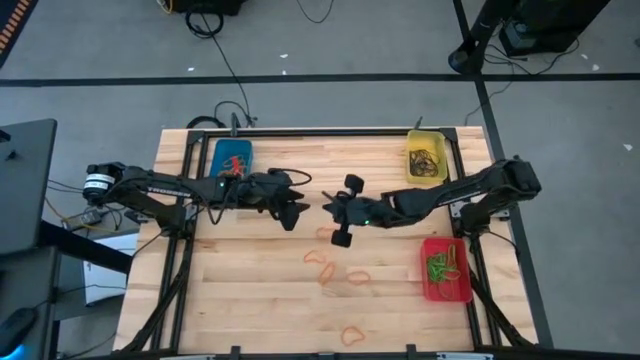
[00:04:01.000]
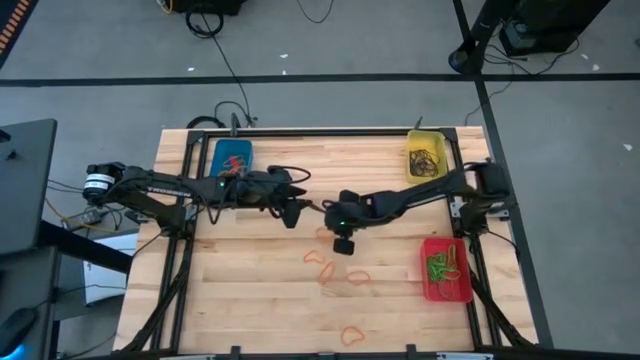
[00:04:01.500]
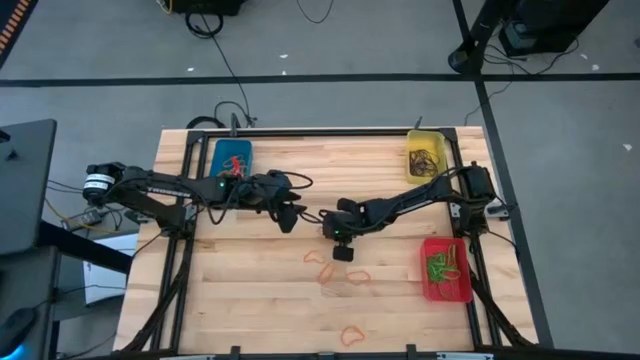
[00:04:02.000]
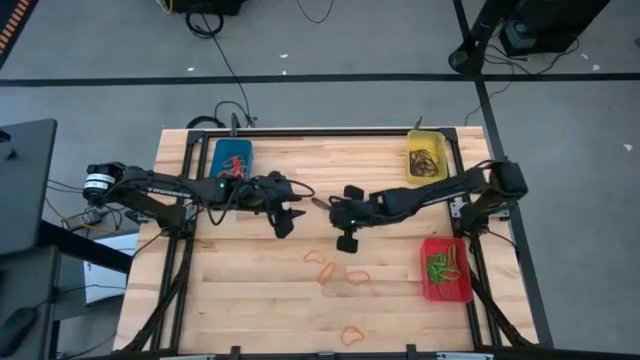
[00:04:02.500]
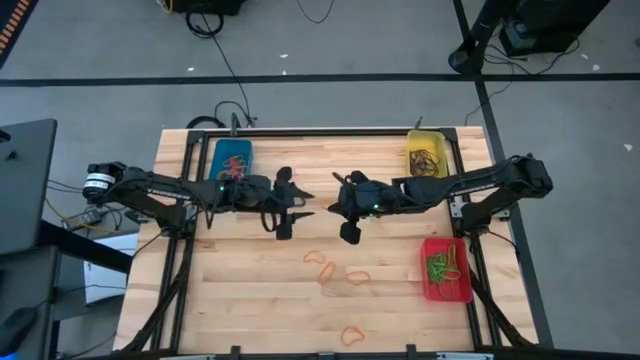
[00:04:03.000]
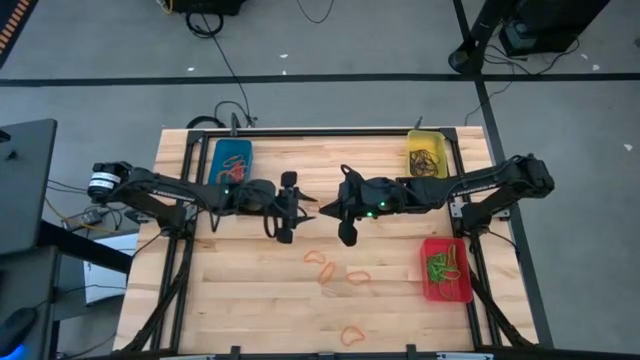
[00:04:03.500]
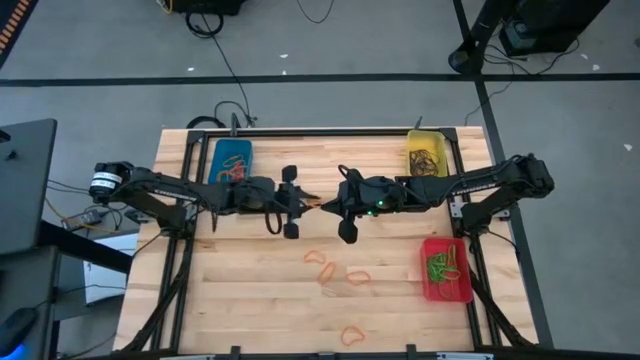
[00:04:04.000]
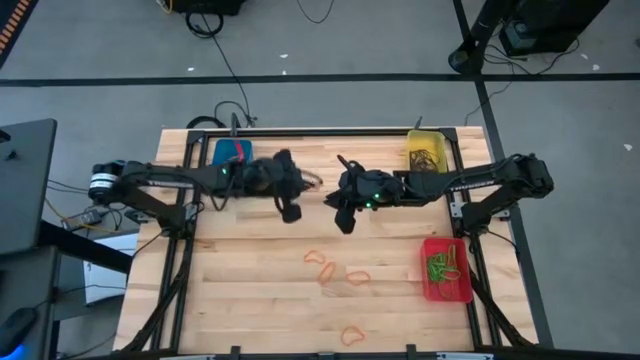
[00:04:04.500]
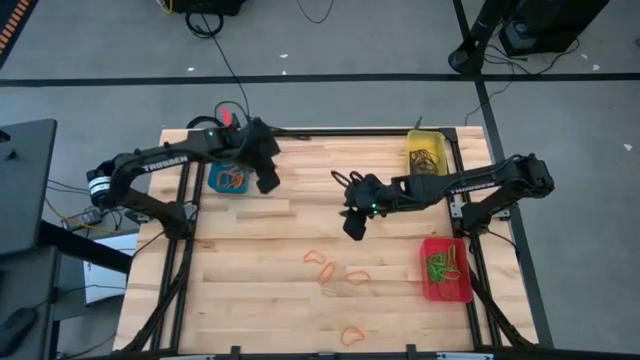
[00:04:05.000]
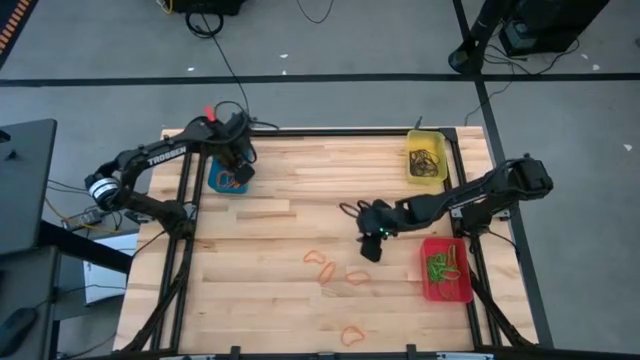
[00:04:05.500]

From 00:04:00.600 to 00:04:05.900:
Task: Sort rubber bands into baskets
Put the orange rubber band into the blue bin

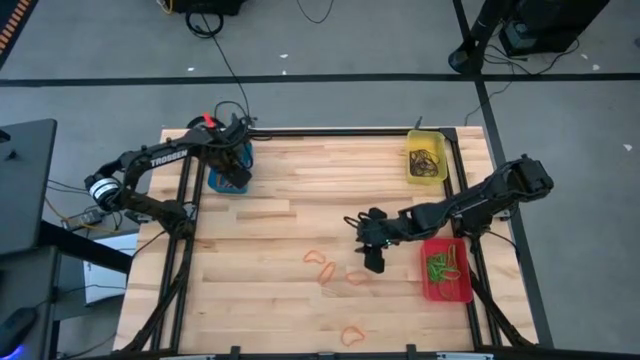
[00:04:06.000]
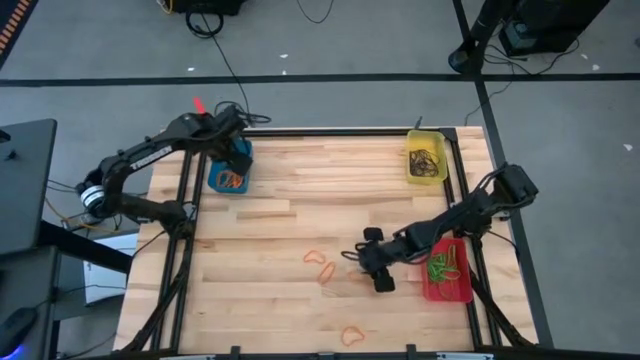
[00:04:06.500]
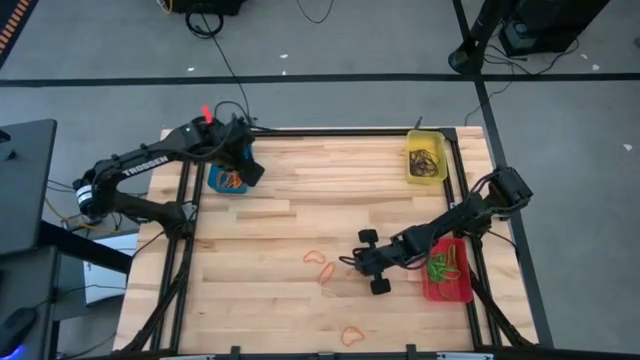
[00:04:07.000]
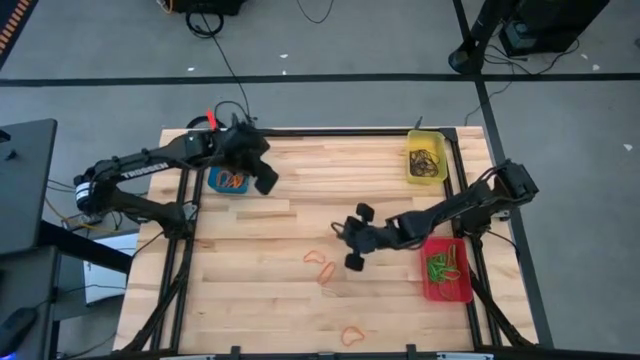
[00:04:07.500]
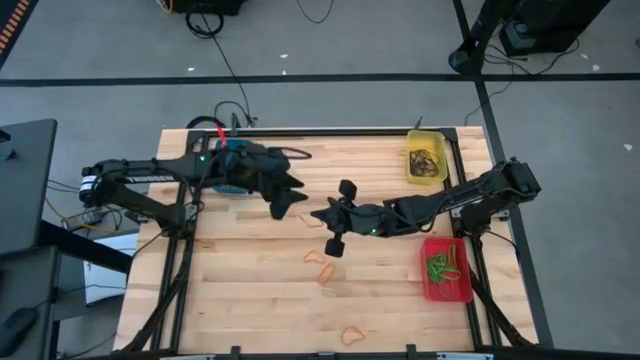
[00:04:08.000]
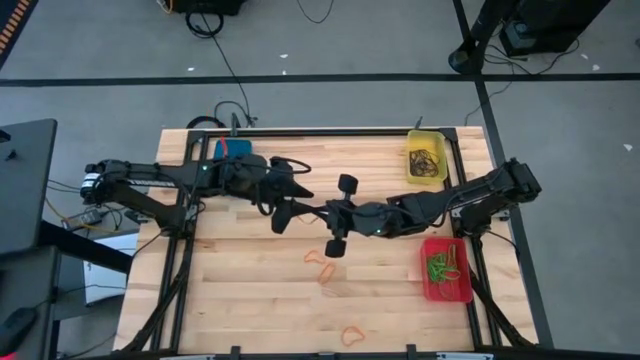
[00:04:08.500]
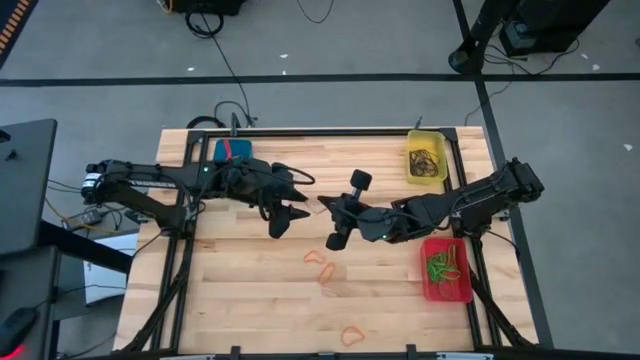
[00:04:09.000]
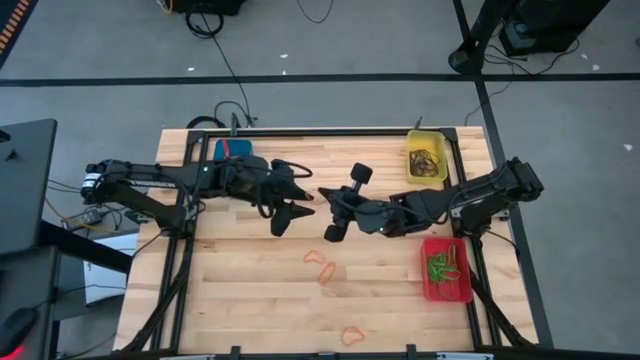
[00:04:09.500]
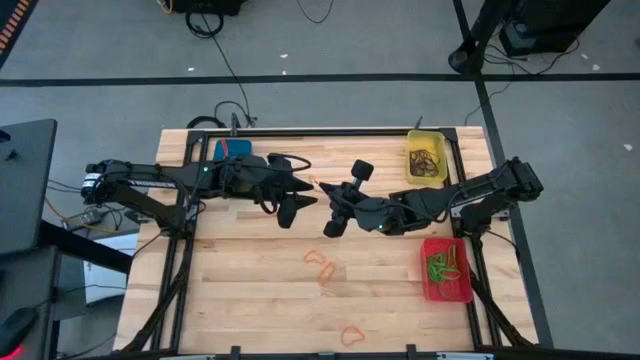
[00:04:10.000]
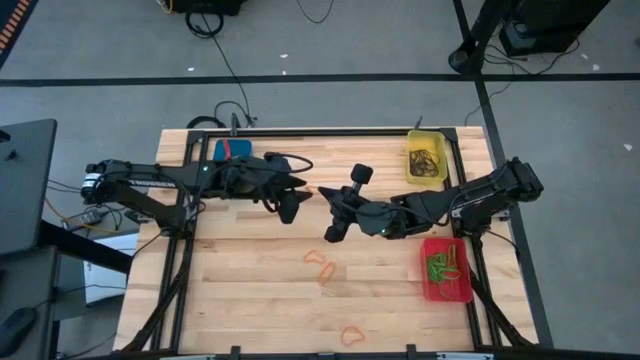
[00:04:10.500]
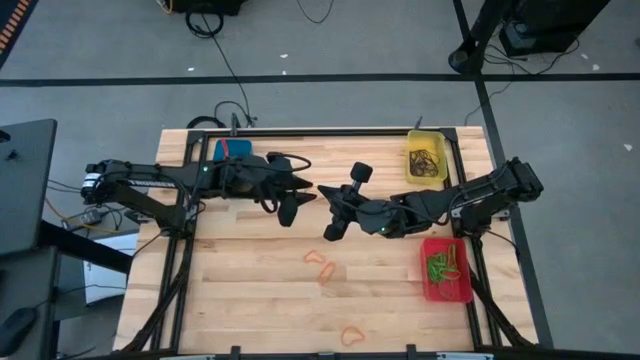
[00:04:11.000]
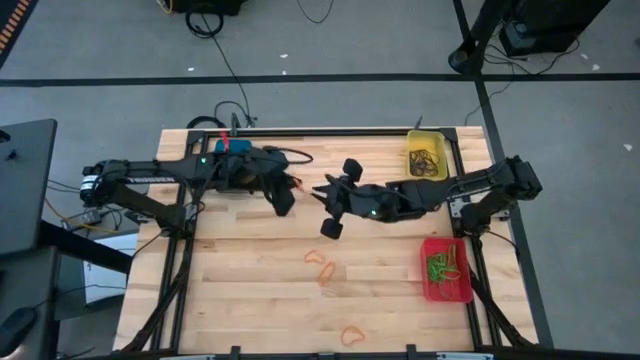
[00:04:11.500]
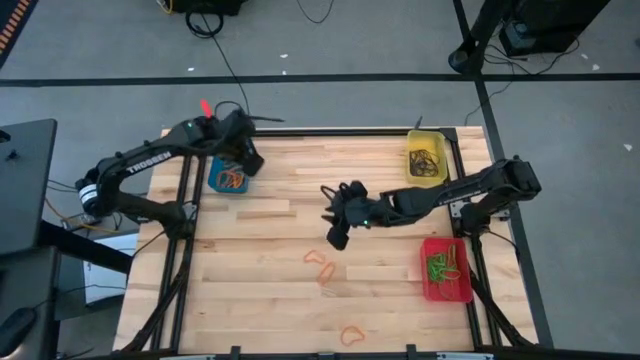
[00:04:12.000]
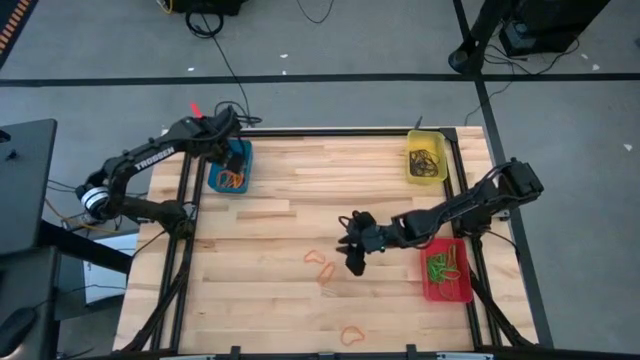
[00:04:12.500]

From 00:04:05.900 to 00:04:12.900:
Put the orange rubber band into the blue bin

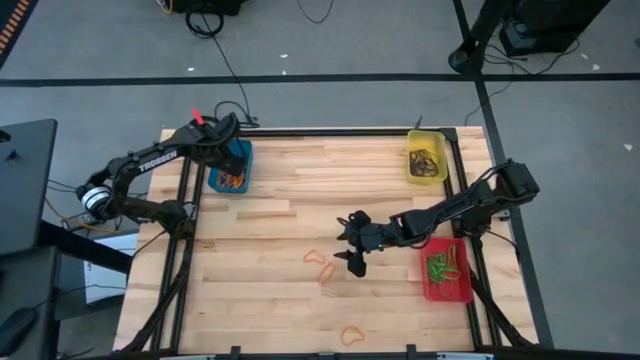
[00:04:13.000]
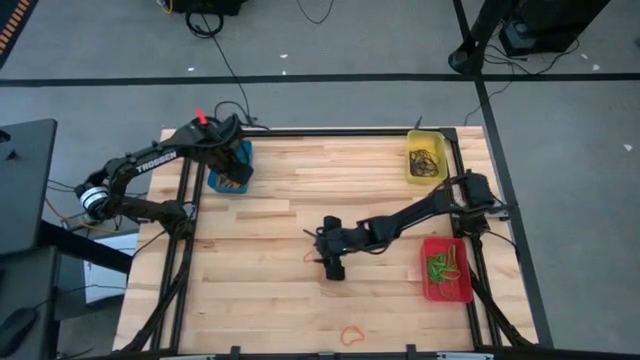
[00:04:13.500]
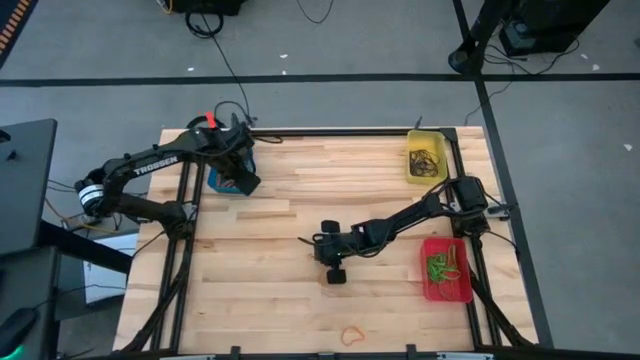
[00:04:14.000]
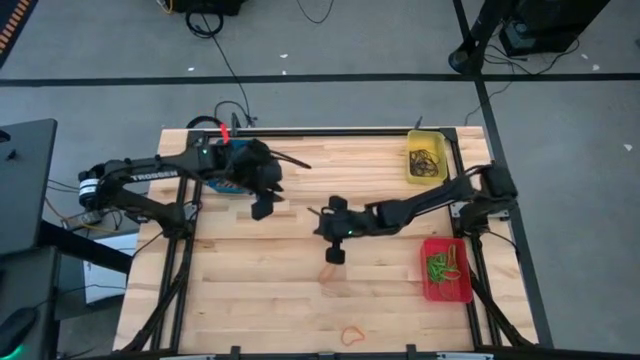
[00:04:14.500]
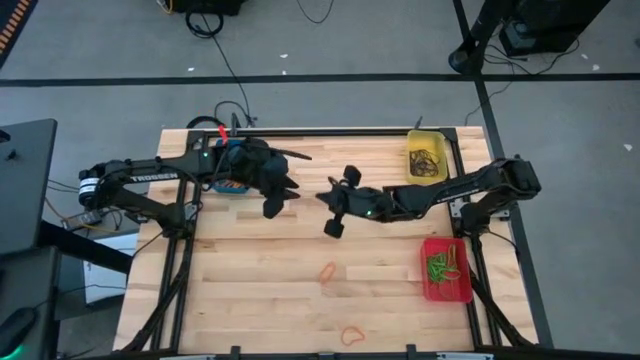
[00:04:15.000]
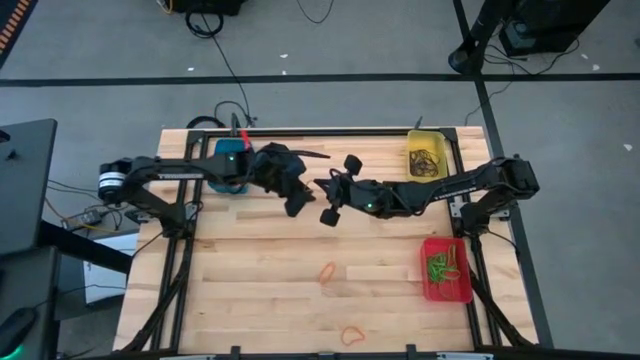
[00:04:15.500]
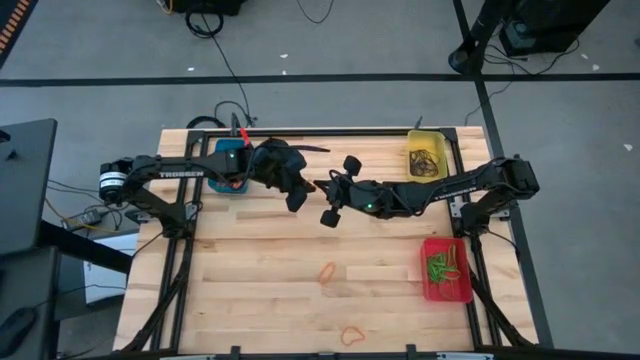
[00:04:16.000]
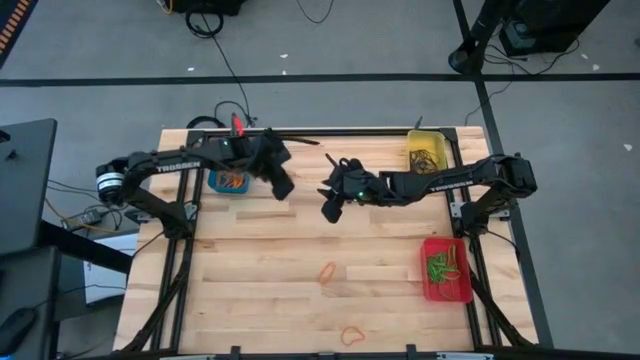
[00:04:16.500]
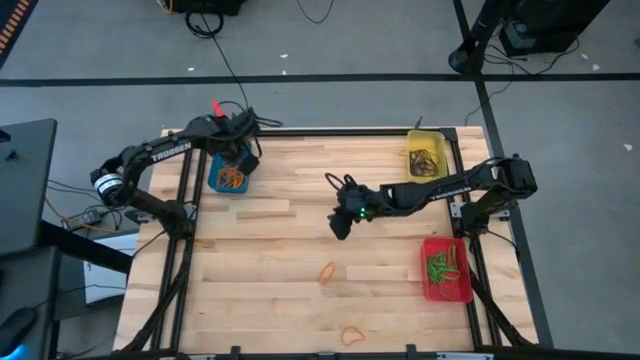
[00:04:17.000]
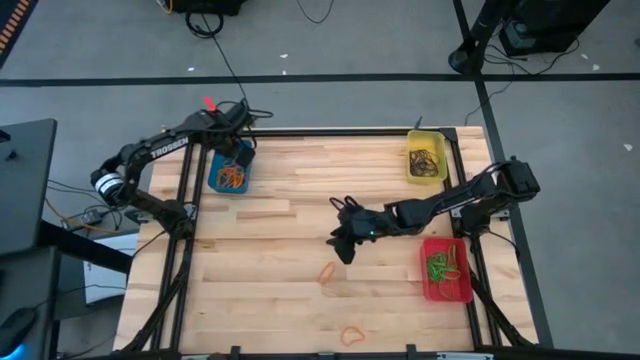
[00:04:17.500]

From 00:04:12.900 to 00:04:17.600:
Put the orange rubber band into the blue bin

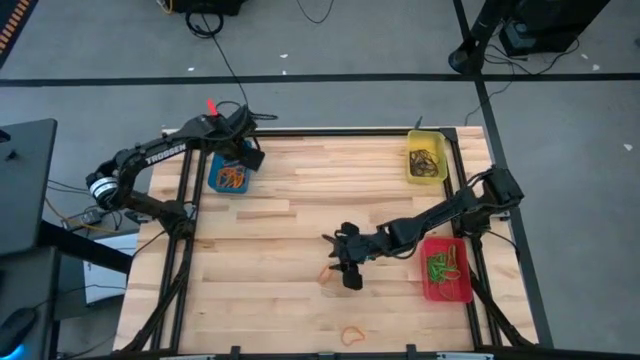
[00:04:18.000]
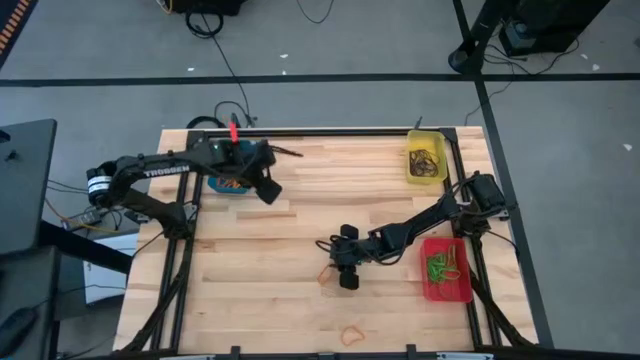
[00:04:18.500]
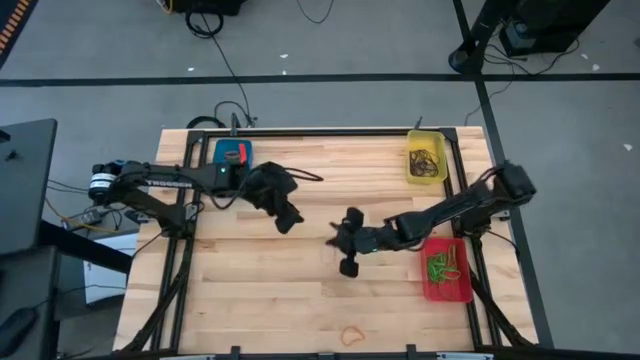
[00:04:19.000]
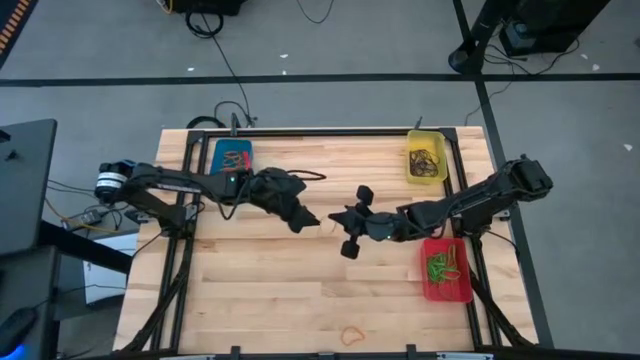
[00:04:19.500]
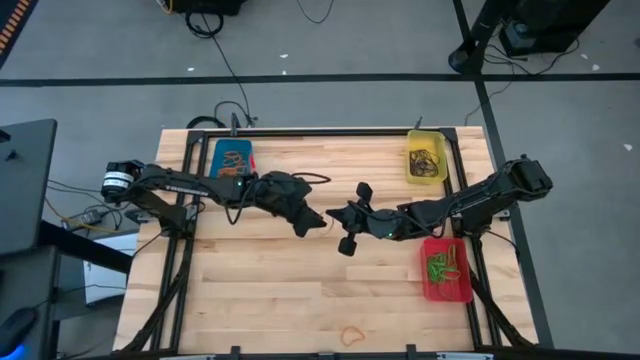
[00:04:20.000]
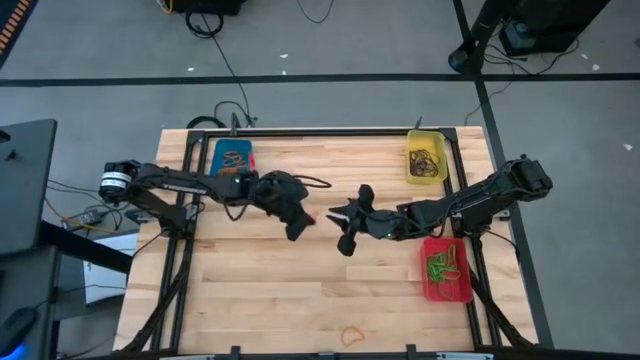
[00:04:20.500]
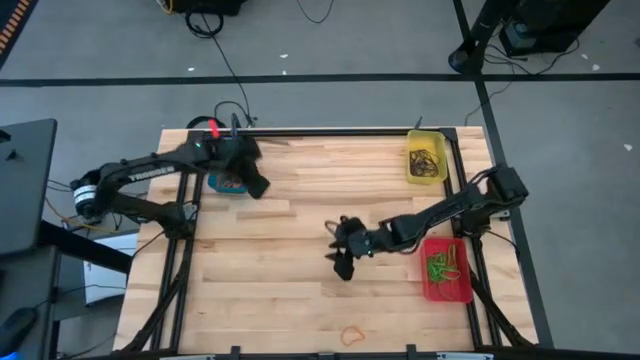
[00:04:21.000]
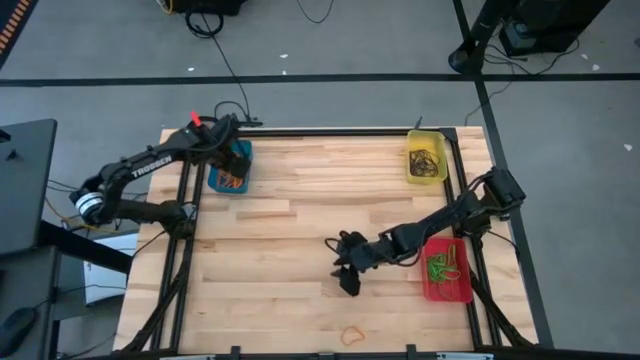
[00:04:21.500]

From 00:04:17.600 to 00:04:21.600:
Put the orange rubber band into the blue bin

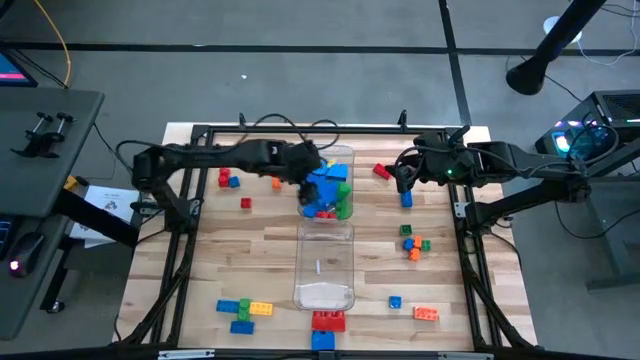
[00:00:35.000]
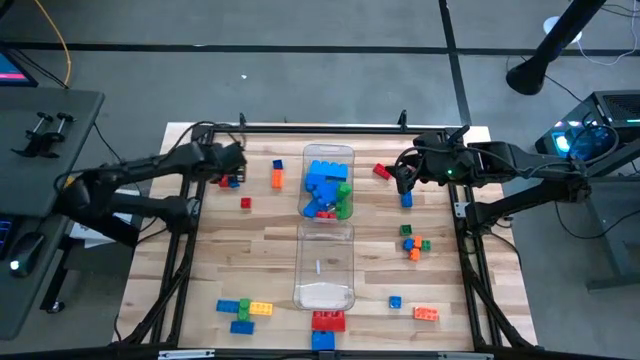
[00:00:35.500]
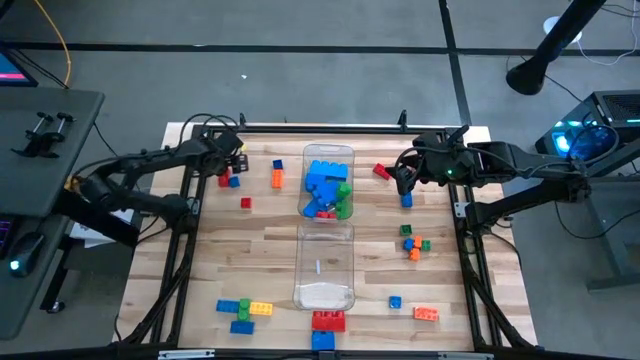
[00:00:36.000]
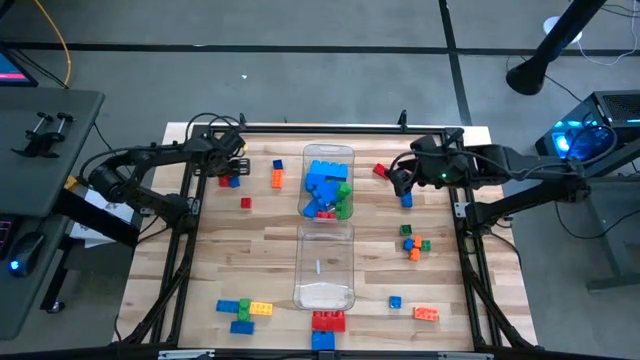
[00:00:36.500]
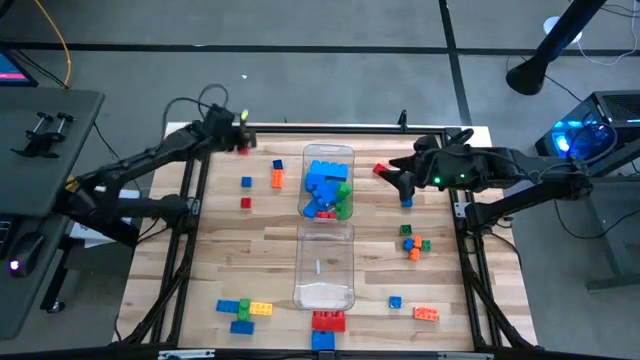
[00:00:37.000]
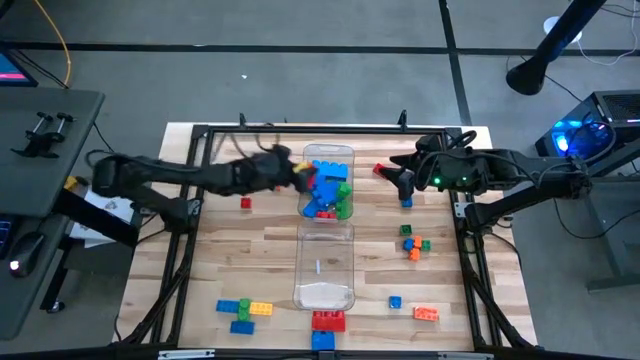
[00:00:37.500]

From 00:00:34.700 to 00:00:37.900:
Task: Sort blocks by size
Put the large red game piece in the top transparent bin
